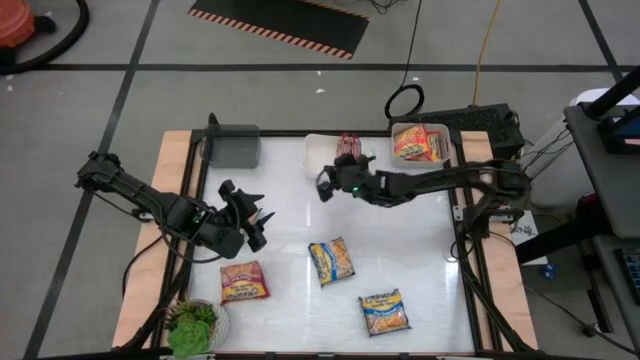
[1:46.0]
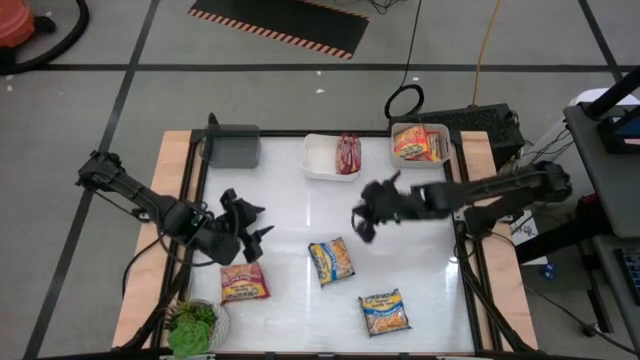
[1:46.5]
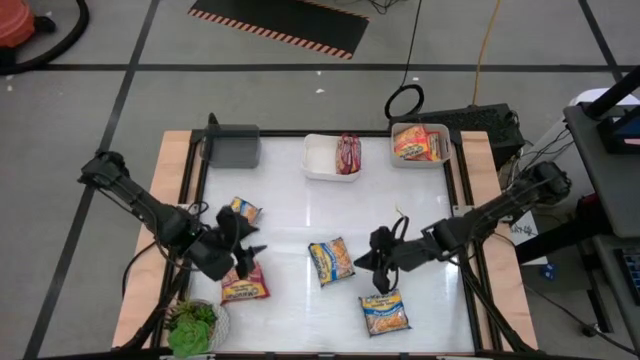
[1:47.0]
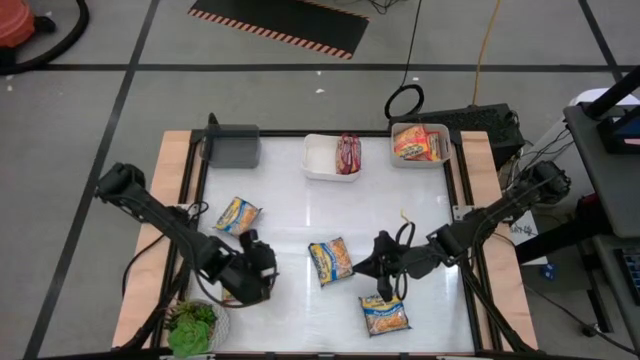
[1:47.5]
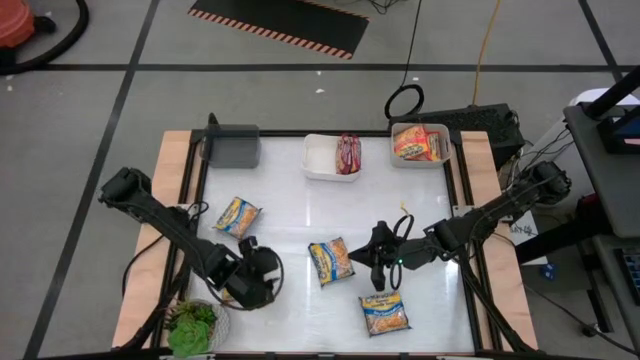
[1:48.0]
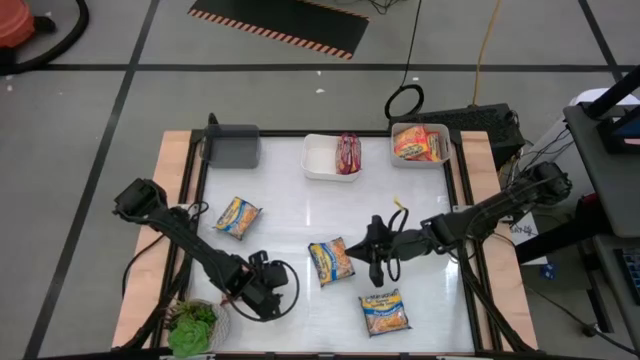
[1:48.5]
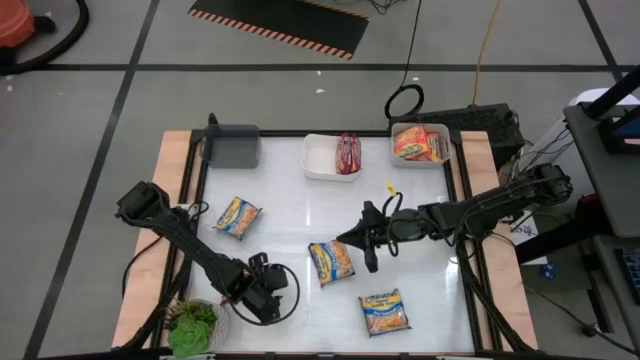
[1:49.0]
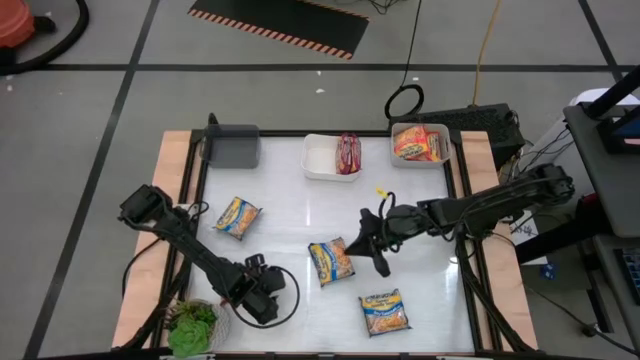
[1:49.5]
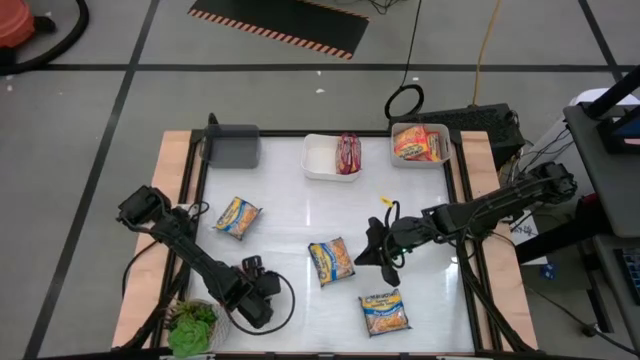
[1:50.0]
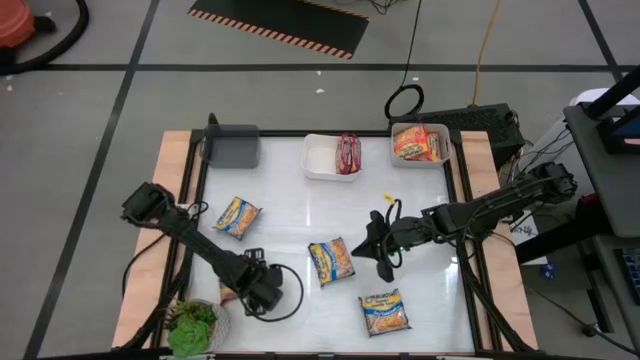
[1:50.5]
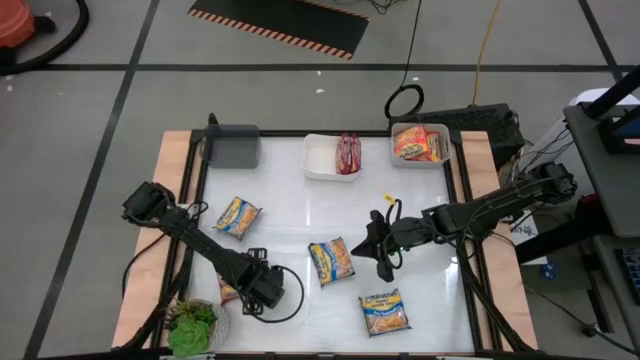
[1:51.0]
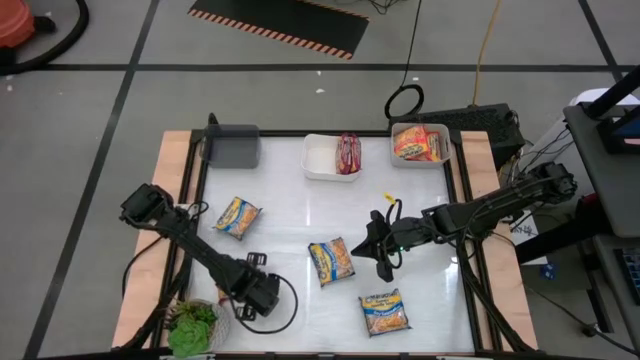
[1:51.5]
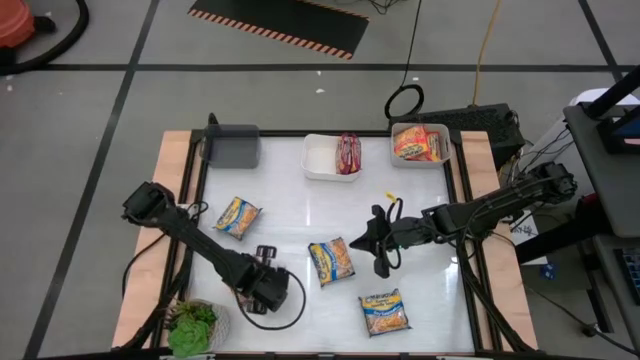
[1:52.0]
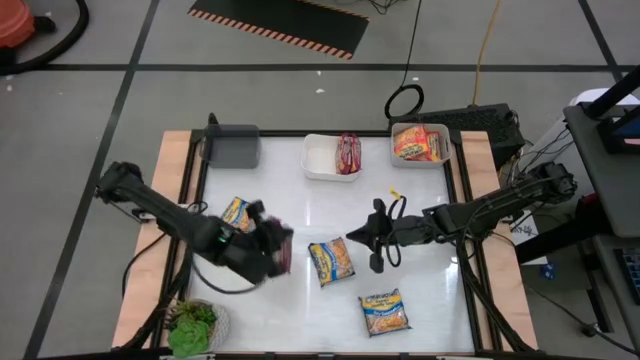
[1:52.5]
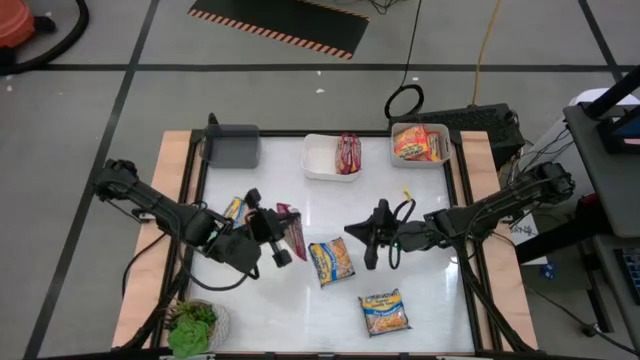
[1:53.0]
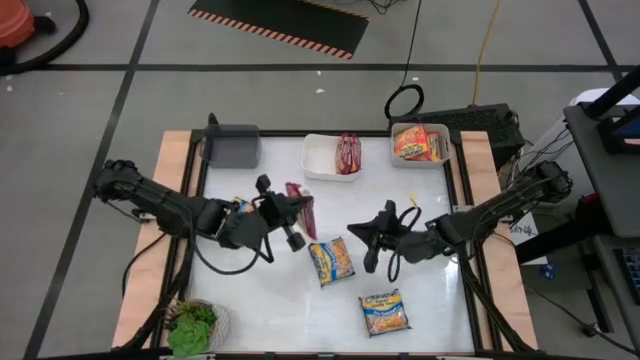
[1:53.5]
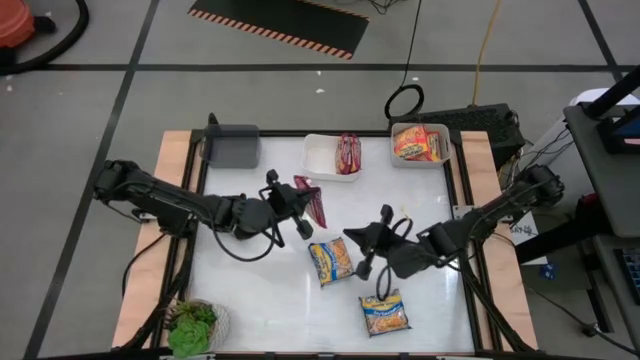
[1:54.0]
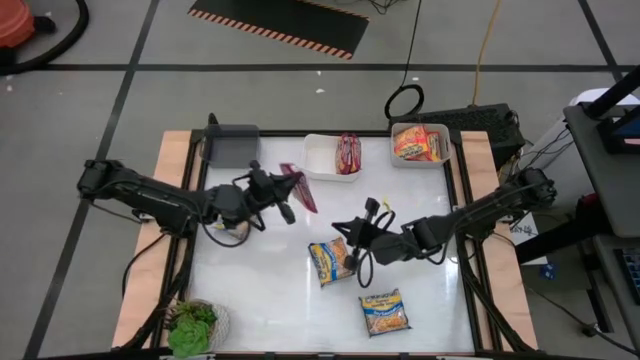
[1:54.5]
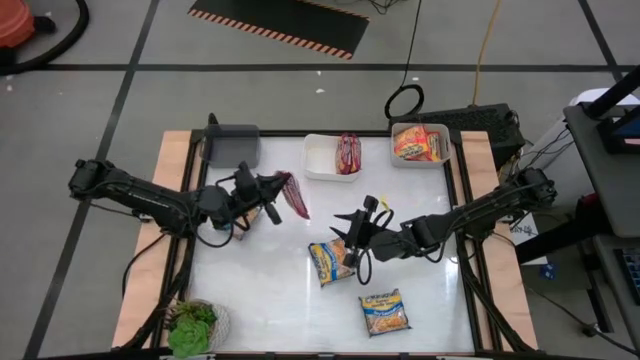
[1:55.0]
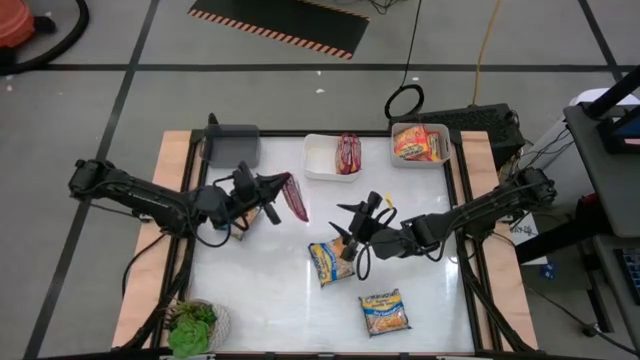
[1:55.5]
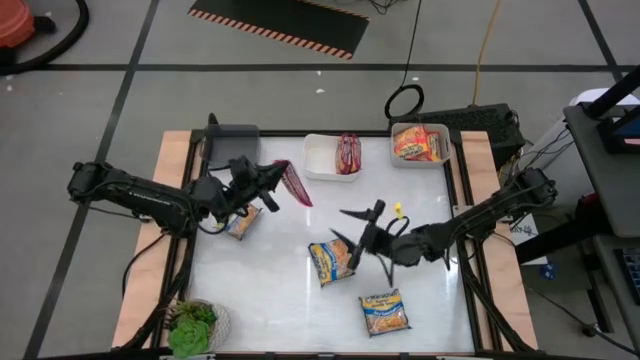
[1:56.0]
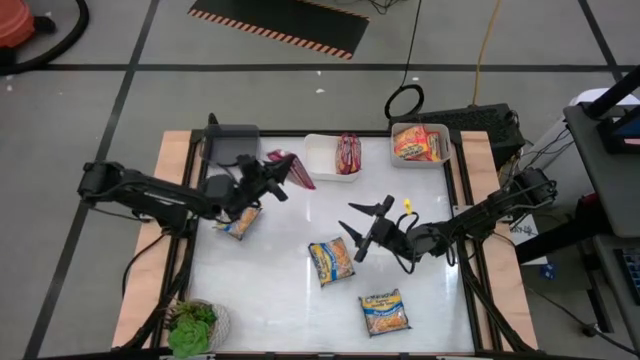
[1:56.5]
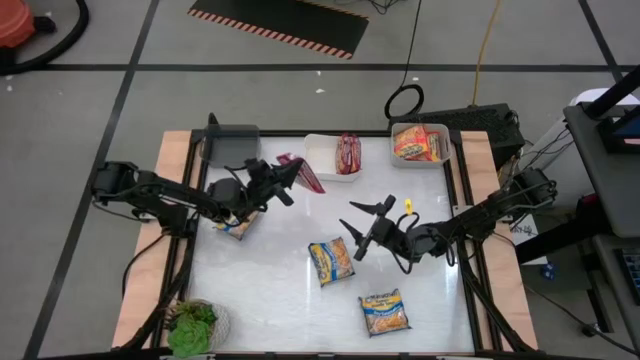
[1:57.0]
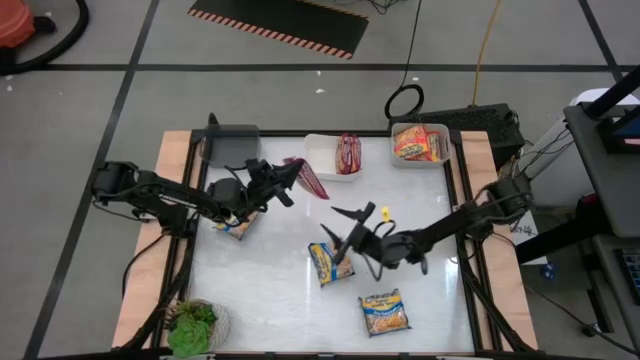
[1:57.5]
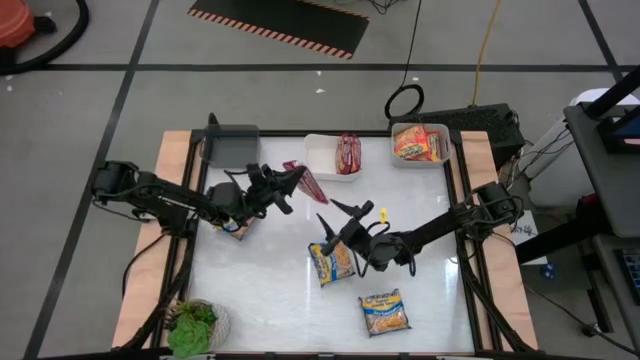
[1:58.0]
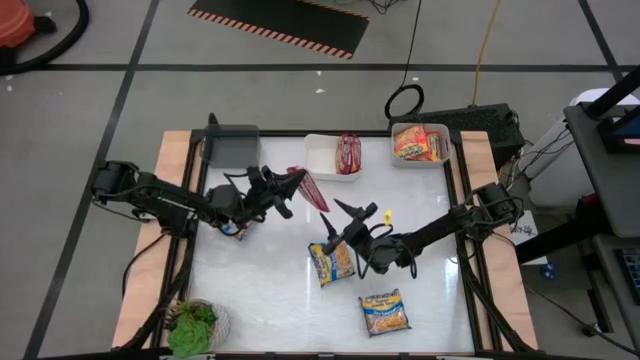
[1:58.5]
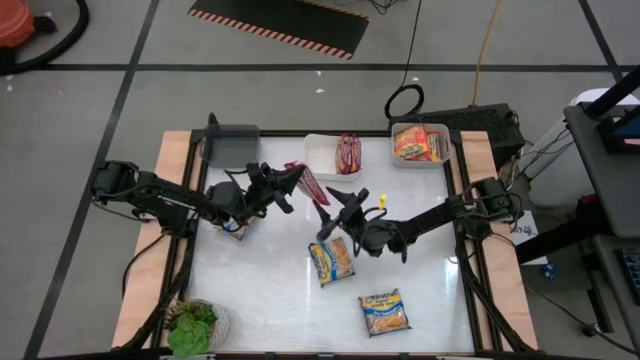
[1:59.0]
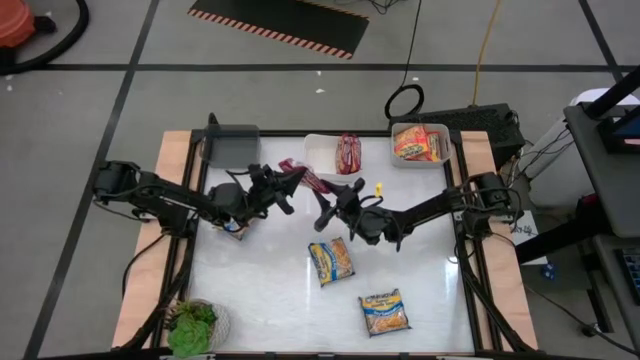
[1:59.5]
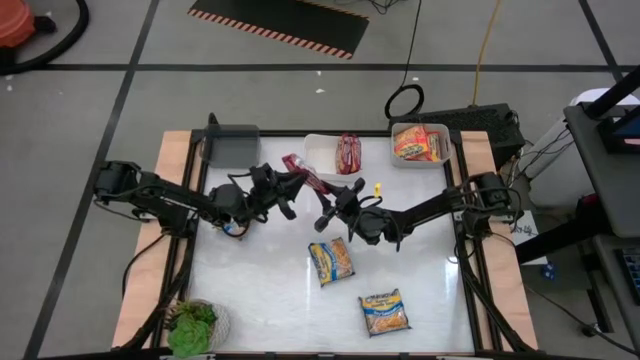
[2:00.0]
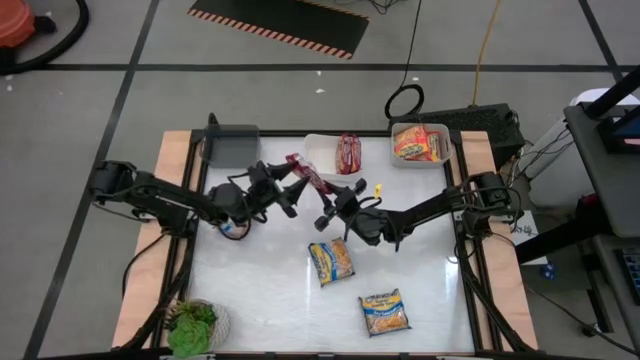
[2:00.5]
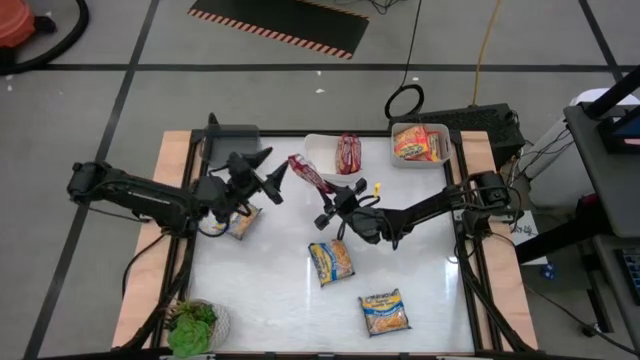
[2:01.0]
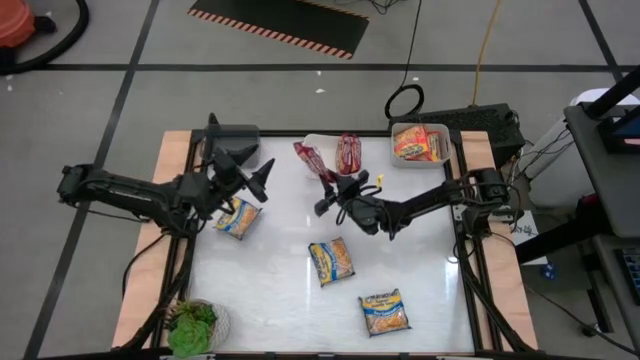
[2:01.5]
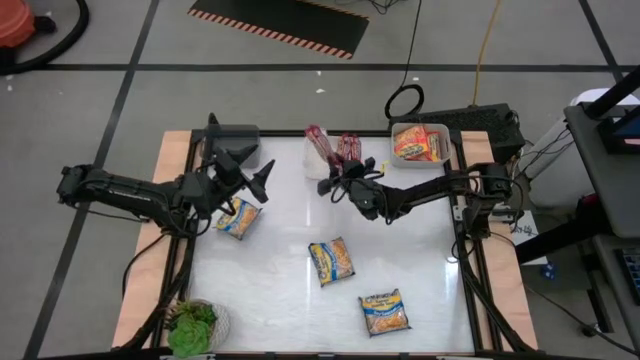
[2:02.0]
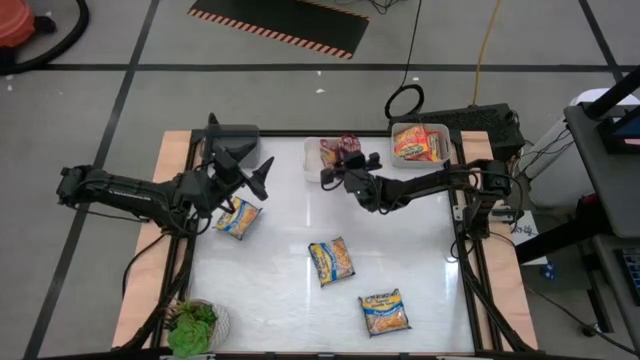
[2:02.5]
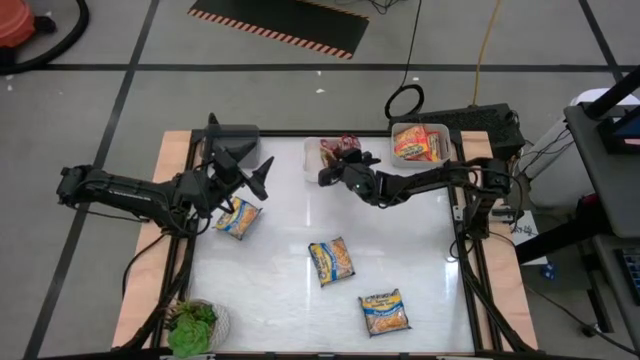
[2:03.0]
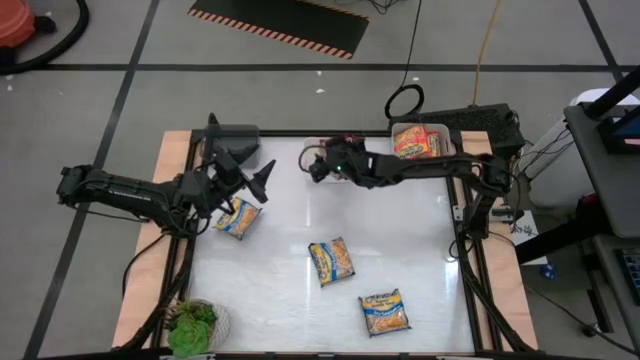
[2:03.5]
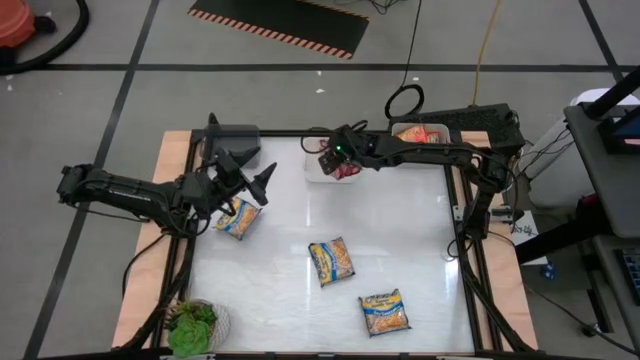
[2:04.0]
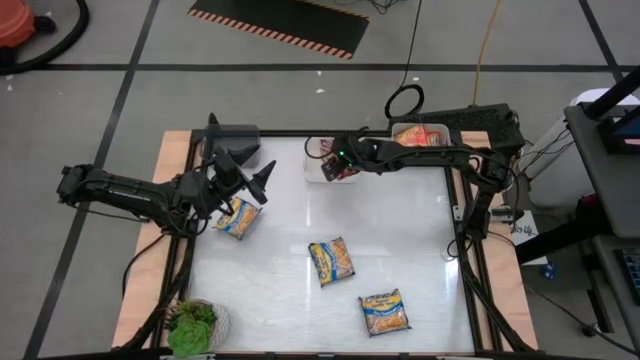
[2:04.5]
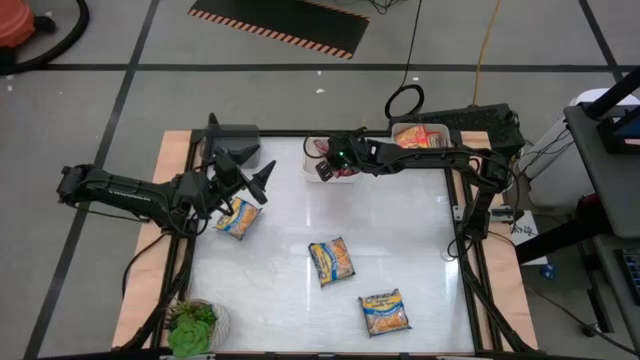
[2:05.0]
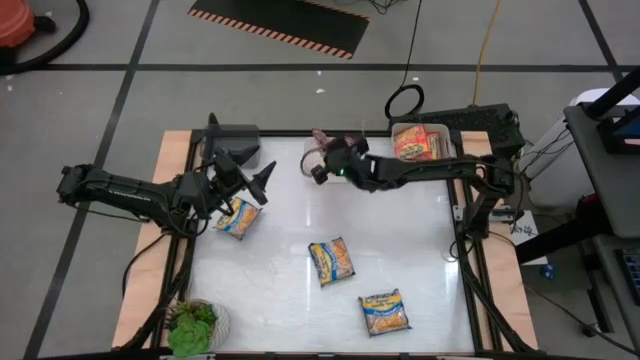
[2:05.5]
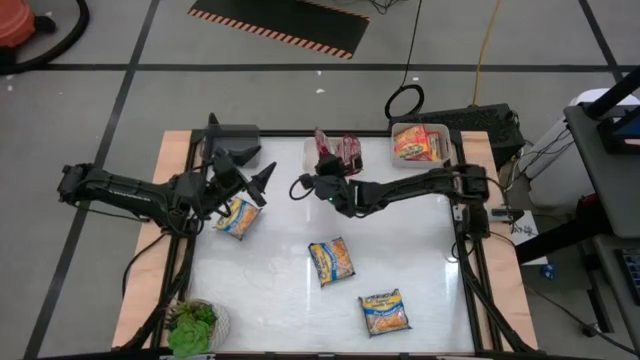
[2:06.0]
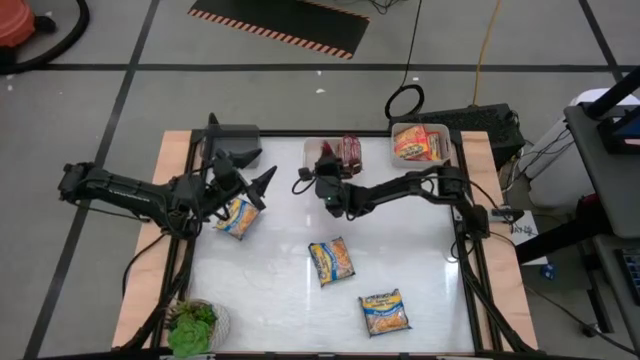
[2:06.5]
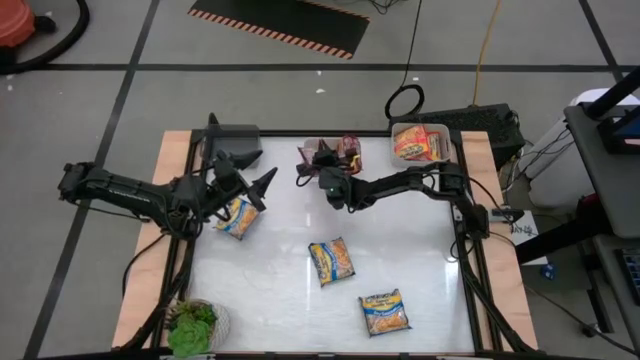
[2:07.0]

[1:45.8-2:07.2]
Task: Sort Maruchan noodles
Put the red noodle pack into the white bin
